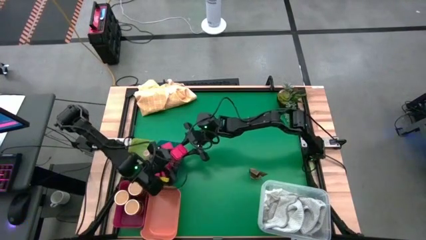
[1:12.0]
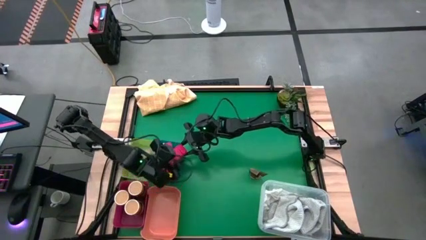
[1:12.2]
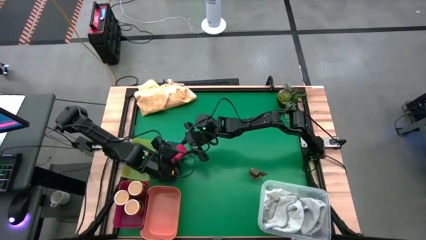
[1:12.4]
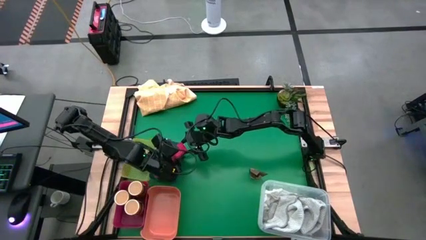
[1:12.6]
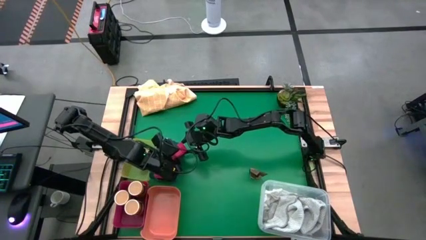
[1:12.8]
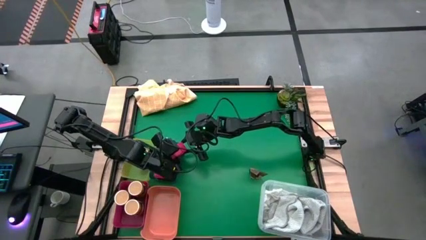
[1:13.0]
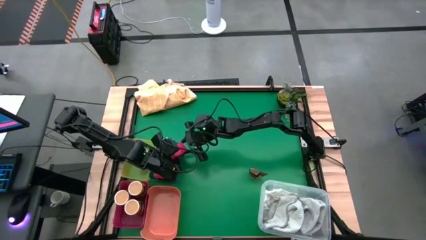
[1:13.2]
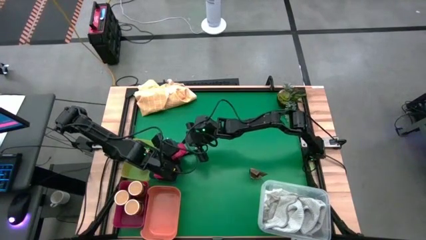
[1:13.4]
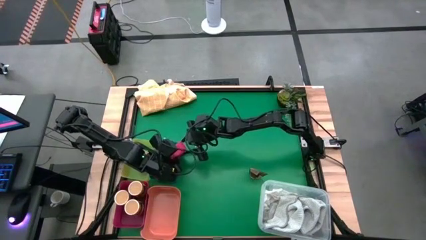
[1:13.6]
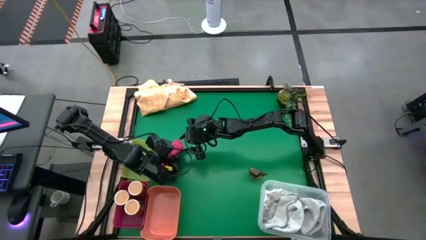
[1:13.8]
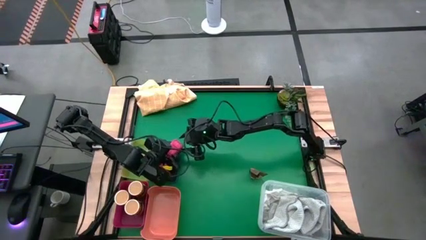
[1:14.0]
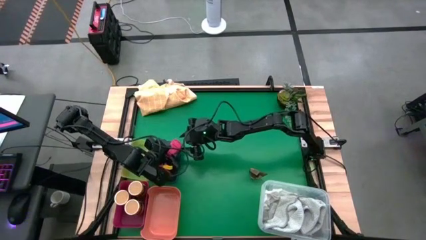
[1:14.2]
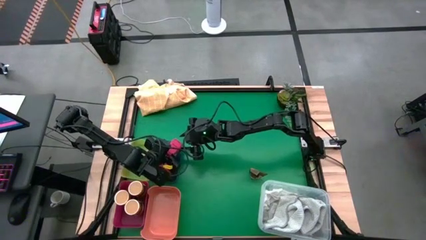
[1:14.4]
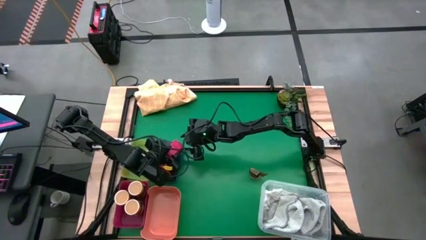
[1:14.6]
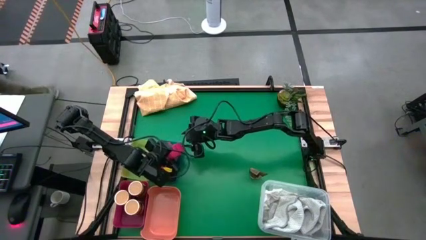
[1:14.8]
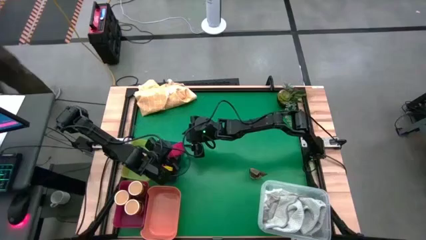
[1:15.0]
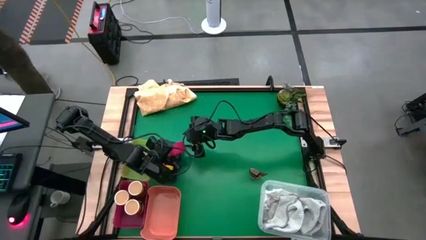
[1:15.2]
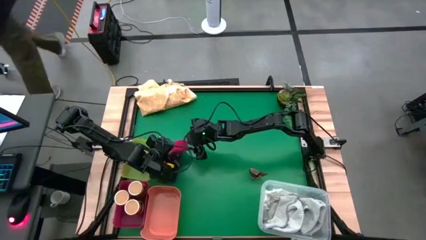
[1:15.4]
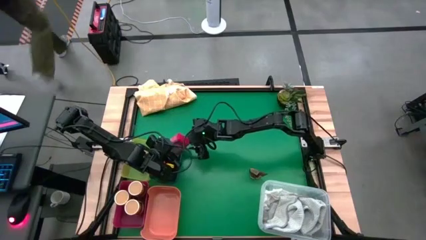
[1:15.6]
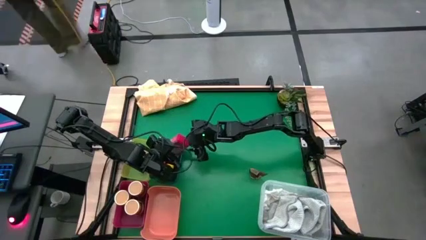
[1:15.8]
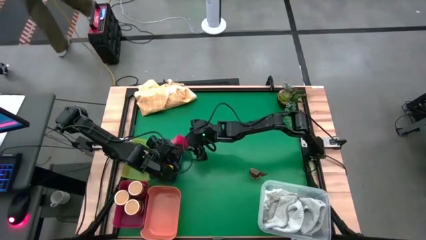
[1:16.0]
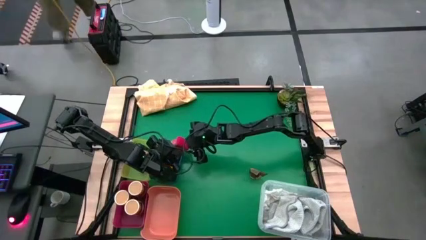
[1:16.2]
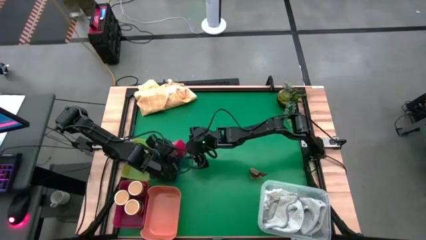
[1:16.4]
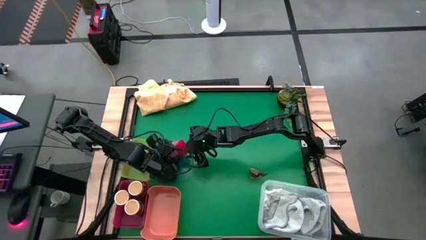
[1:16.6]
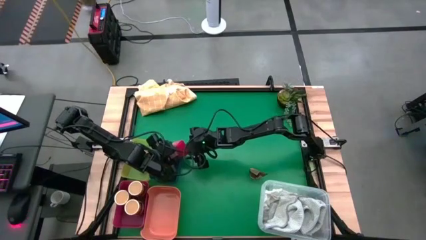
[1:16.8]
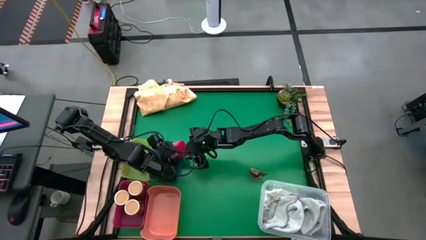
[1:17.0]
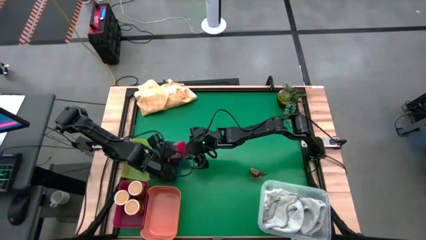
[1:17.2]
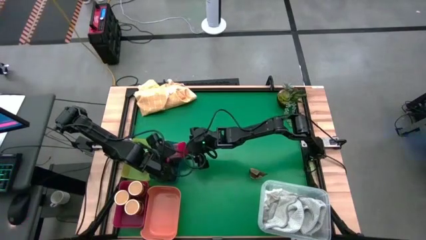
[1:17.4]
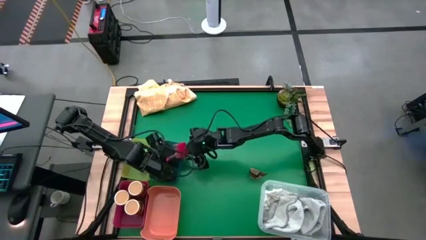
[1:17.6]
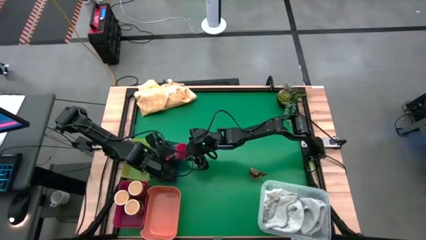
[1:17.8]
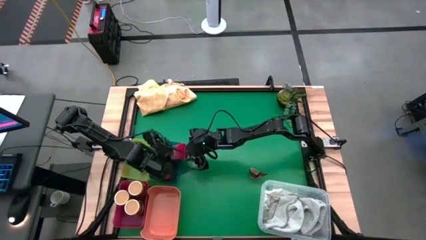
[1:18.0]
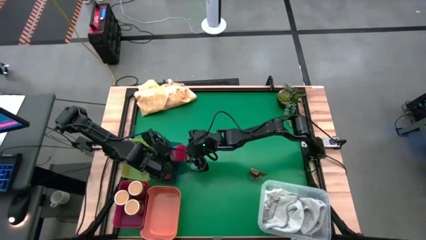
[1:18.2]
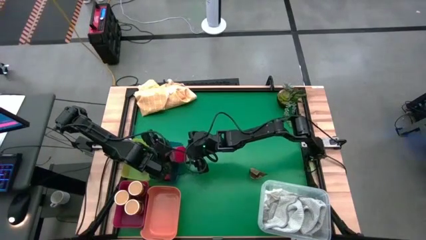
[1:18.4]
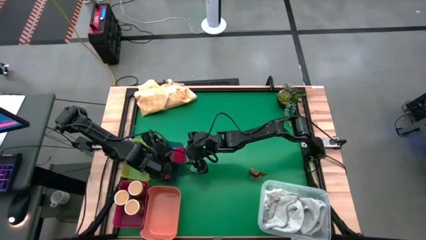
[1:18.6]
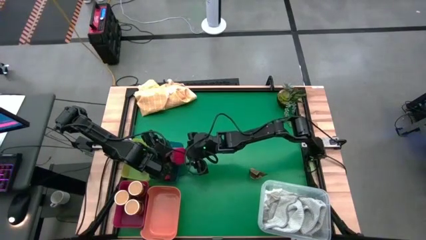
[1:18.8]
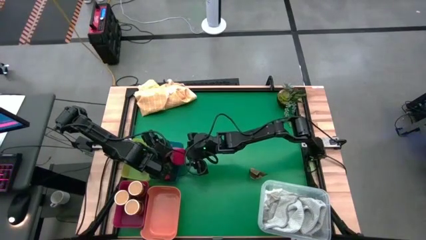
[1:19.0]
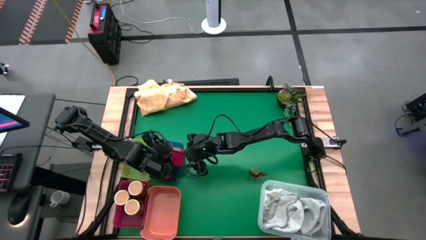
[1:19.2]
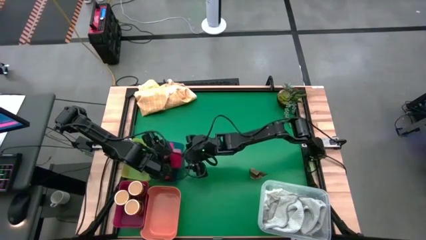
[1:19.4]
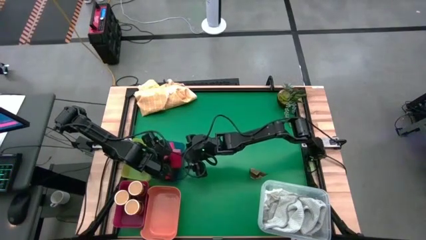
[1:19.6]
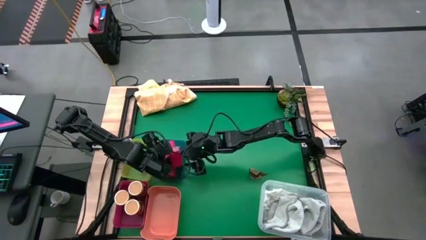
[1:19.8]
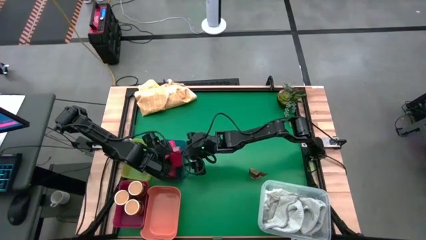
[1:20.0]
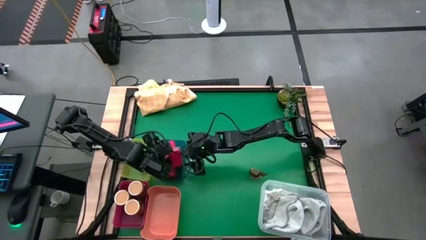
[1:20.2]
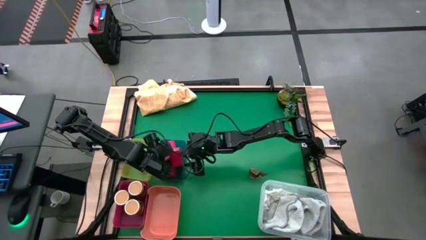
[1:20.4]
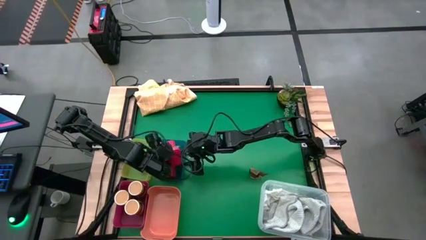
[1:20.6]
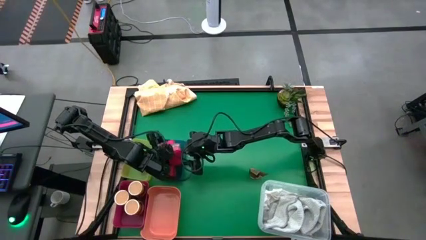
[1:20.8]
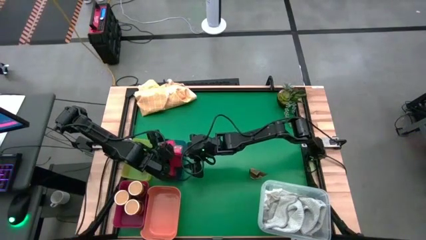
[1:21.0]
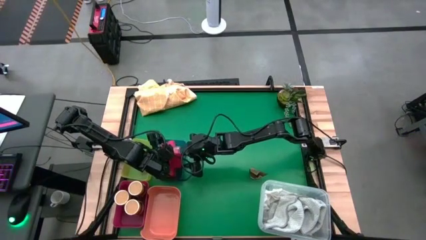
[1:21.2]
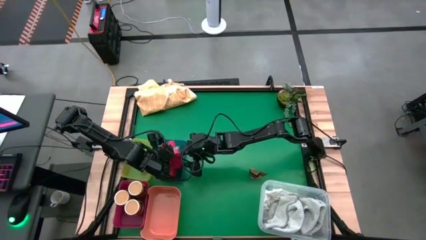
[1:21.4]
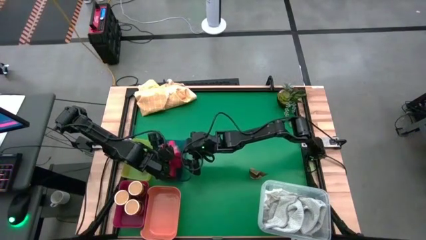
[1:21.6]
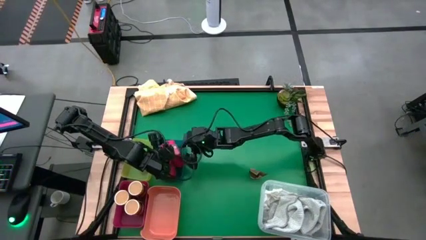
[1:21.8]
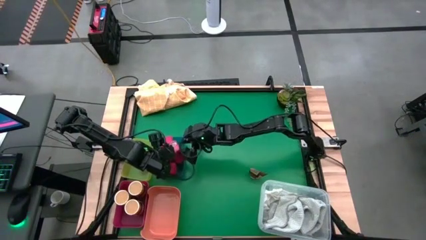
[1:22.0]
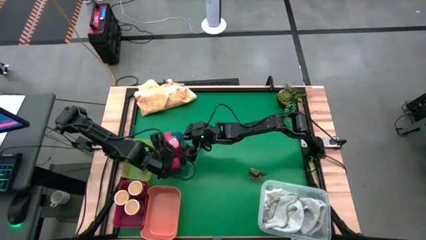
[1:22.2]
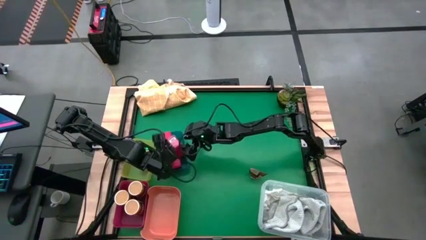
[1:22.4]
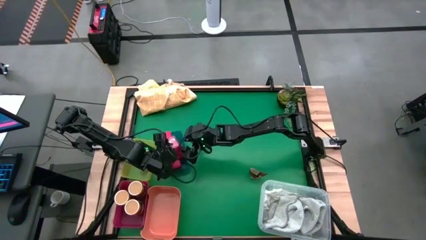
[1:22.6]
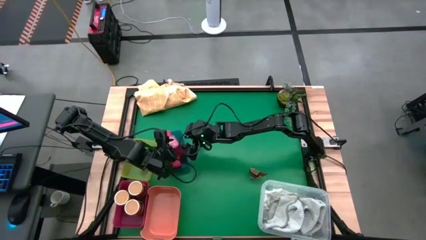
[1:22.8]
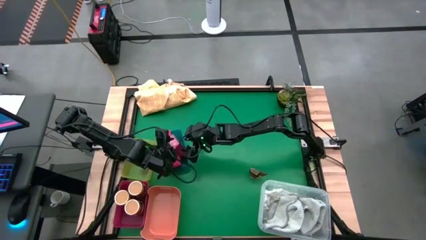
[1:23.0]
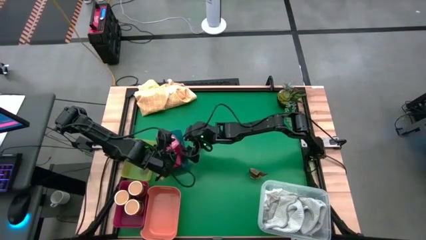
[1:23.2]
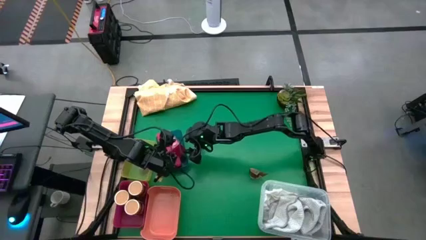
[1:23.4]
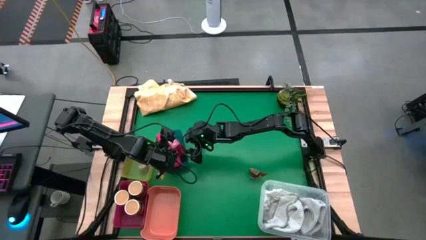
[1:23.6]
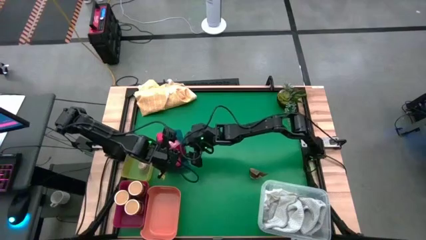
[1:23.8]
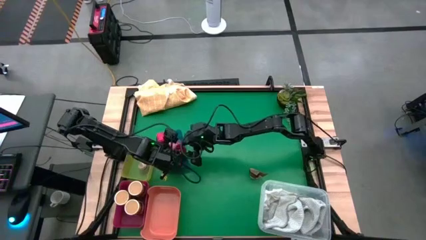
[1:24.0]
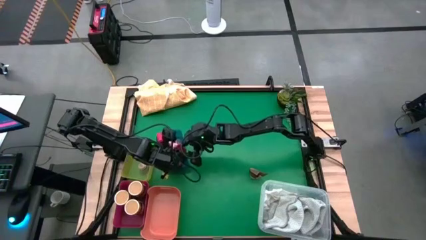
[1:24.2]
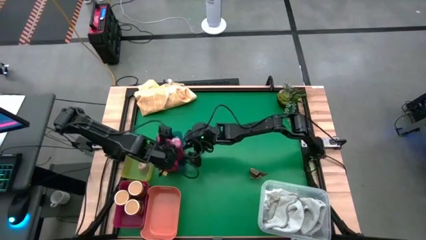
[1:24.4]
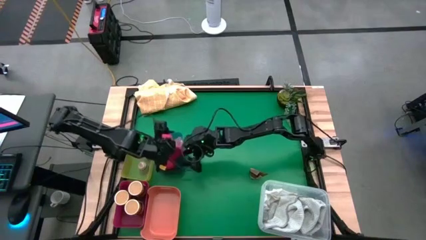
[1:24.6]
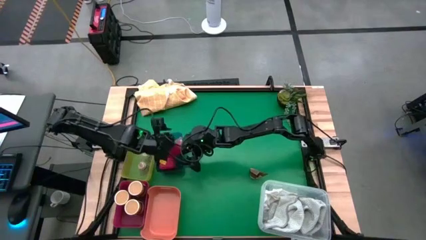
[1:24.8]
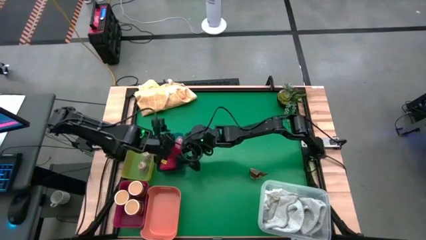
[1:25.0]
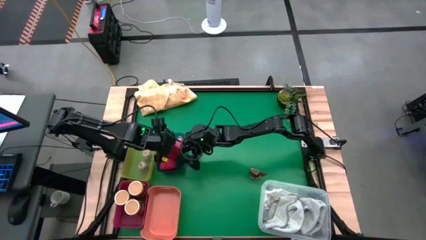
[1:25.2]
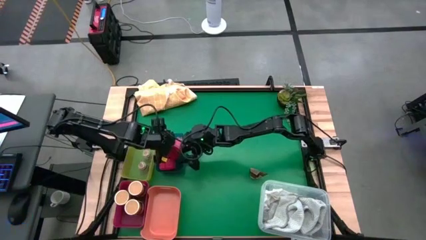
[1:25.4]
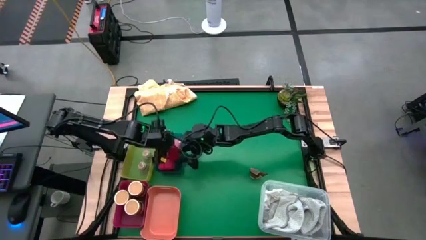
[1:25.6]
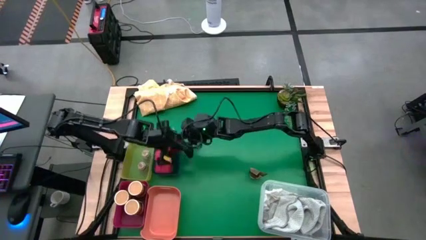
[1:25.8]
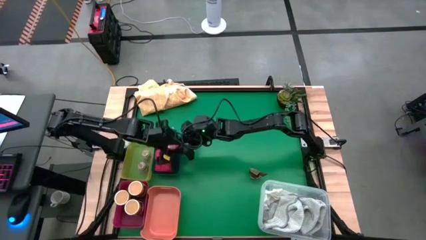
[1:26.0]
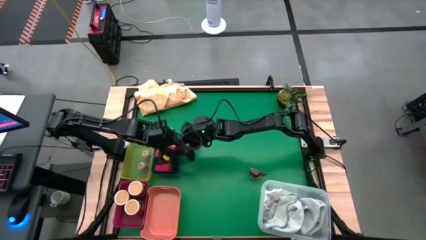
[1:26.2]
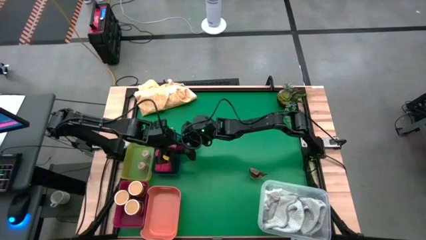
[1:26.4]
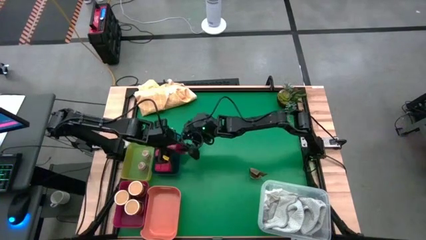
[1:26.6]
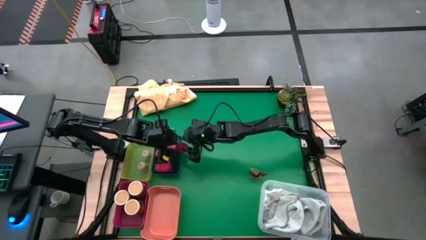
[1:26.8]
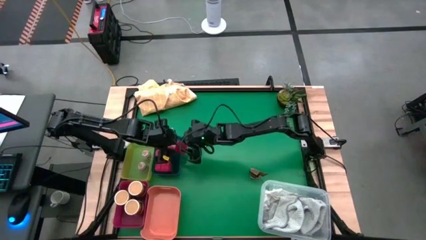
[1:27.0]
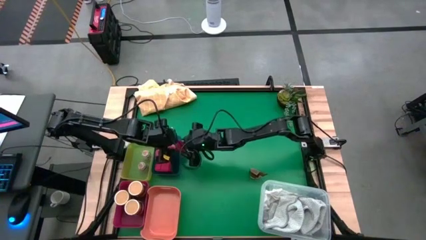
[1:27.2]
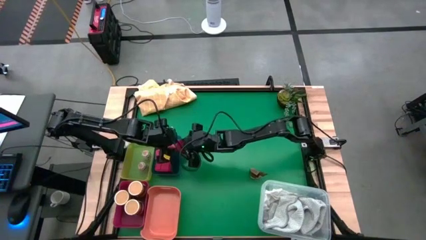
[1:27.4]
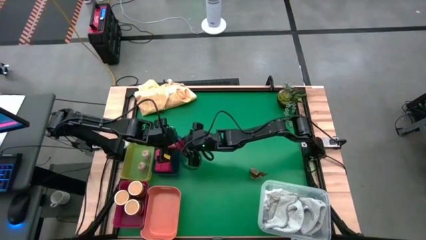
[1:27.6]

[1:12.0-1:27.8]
Task: Sort spices by type
Put the red seasoning can into the blue bin
